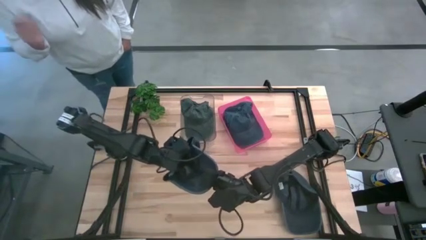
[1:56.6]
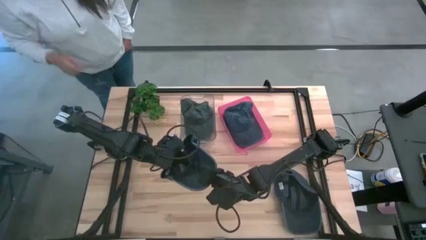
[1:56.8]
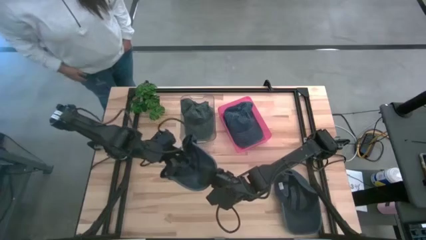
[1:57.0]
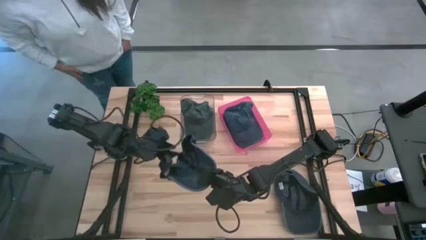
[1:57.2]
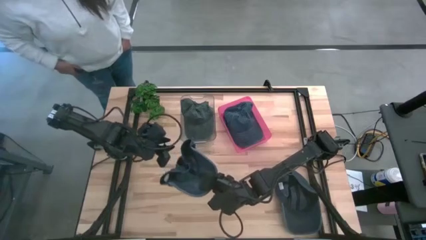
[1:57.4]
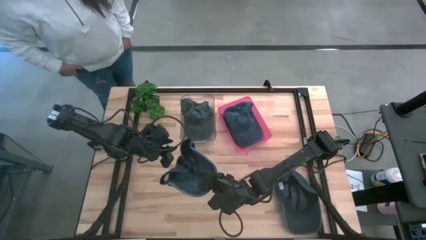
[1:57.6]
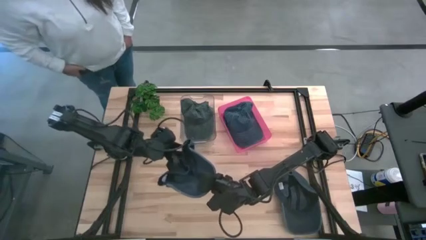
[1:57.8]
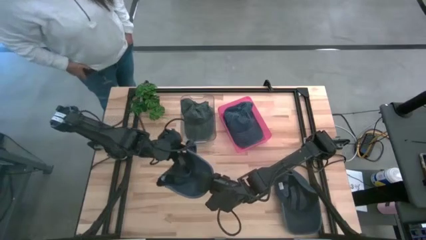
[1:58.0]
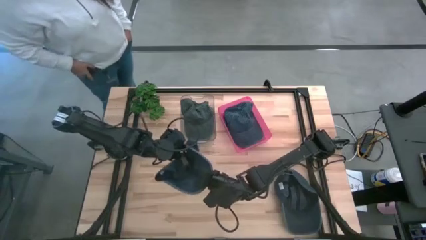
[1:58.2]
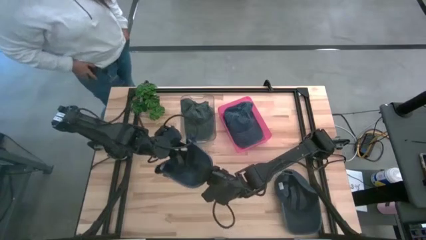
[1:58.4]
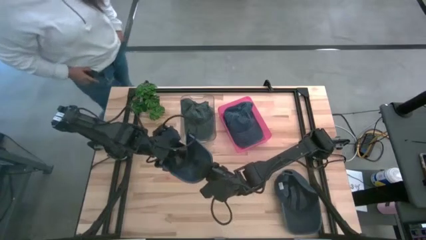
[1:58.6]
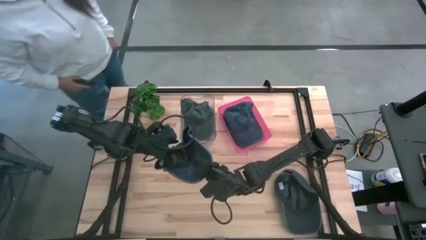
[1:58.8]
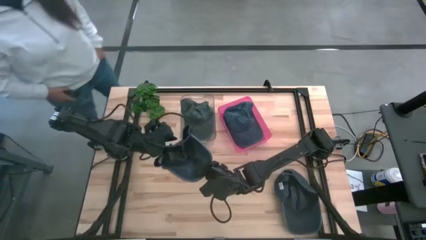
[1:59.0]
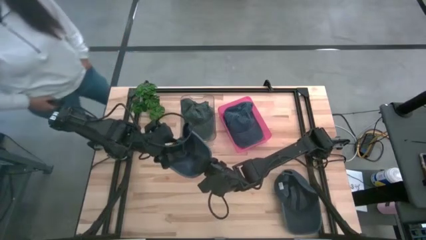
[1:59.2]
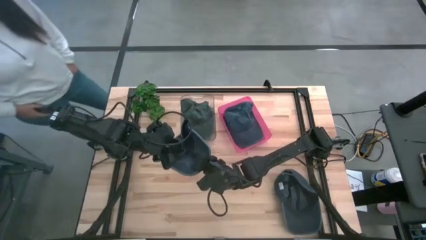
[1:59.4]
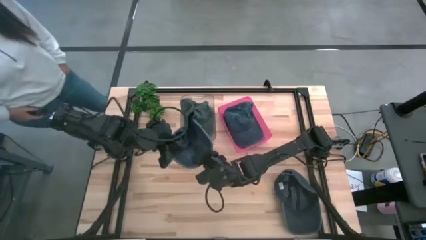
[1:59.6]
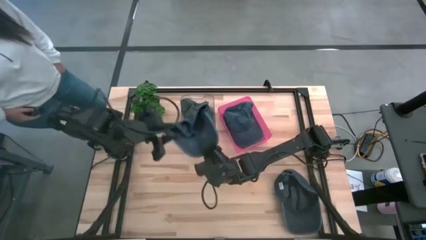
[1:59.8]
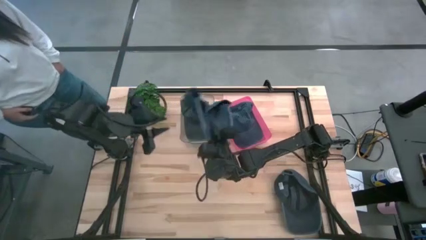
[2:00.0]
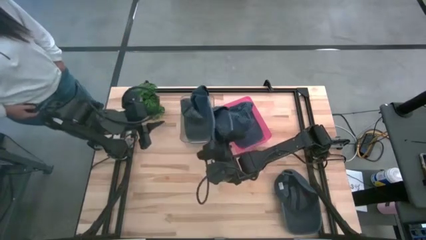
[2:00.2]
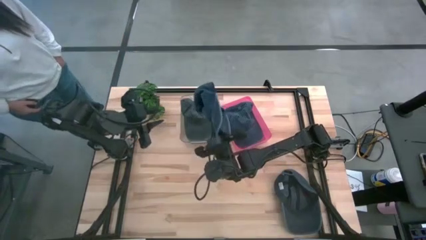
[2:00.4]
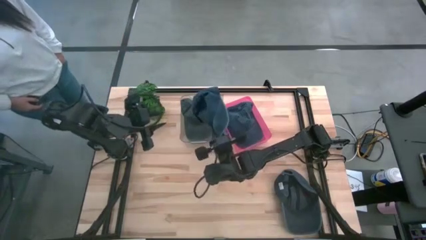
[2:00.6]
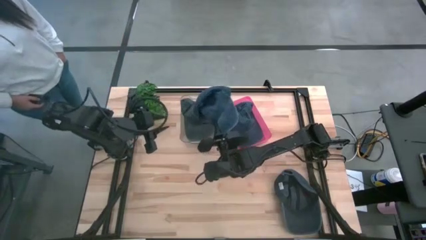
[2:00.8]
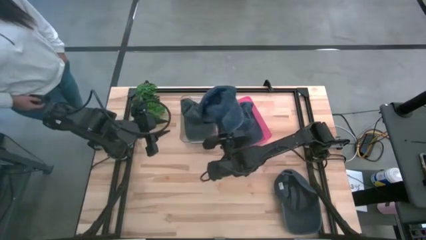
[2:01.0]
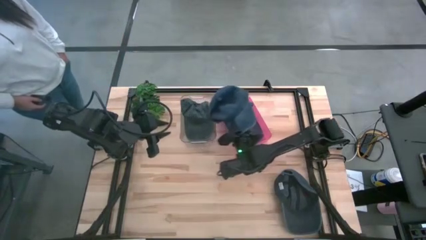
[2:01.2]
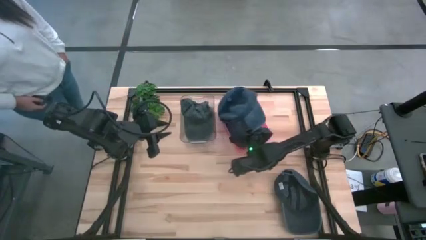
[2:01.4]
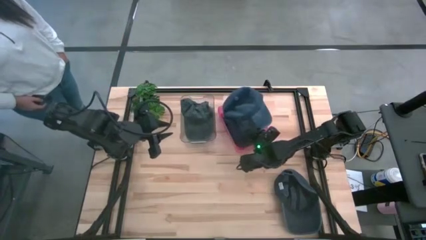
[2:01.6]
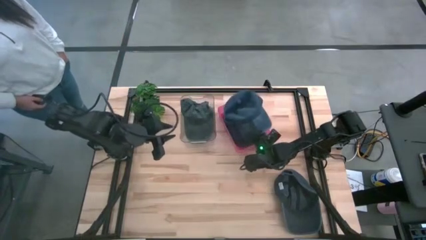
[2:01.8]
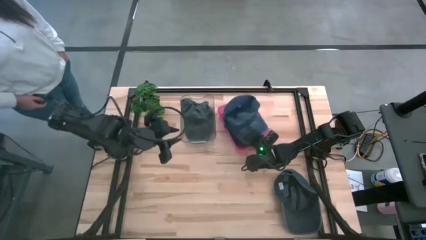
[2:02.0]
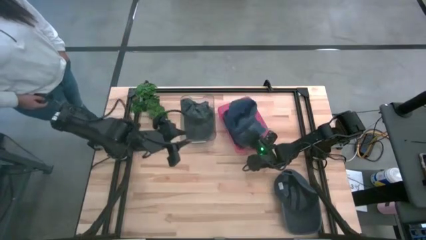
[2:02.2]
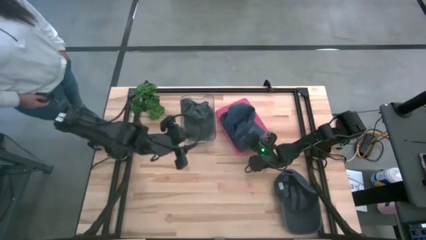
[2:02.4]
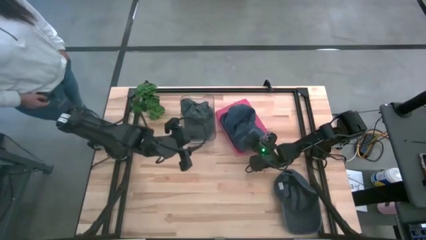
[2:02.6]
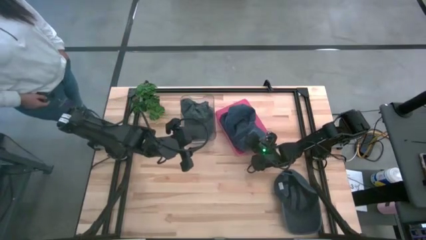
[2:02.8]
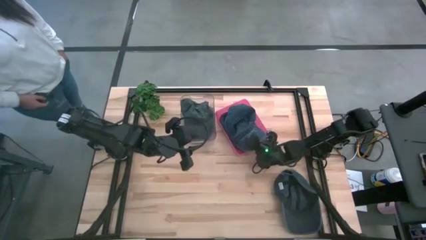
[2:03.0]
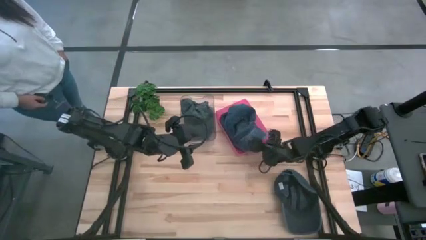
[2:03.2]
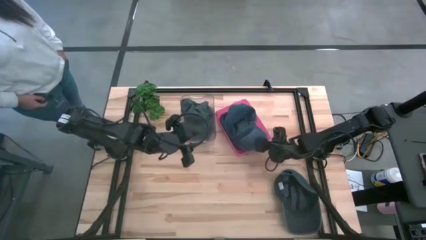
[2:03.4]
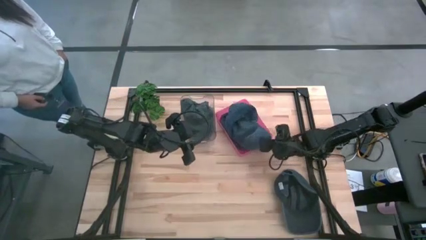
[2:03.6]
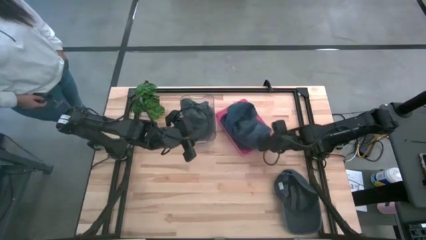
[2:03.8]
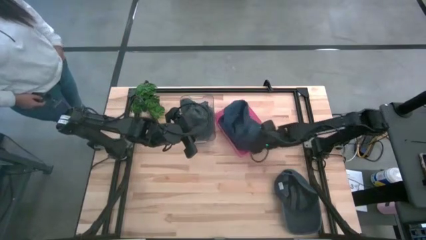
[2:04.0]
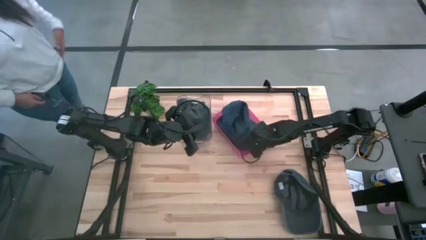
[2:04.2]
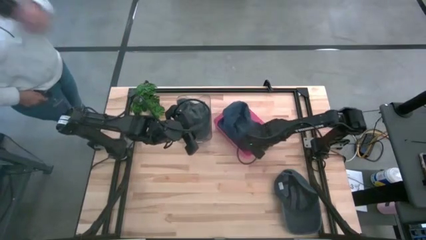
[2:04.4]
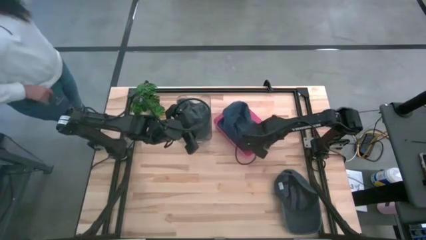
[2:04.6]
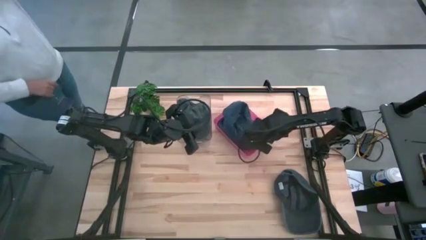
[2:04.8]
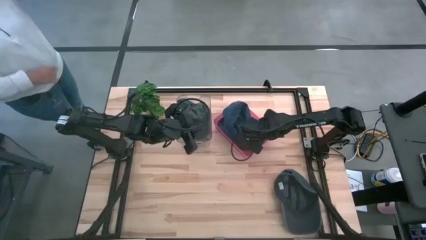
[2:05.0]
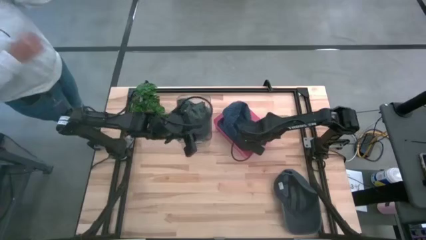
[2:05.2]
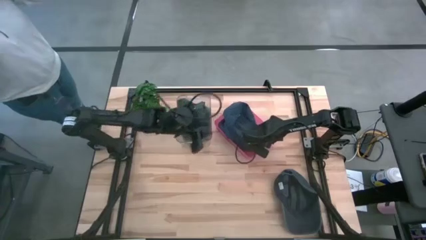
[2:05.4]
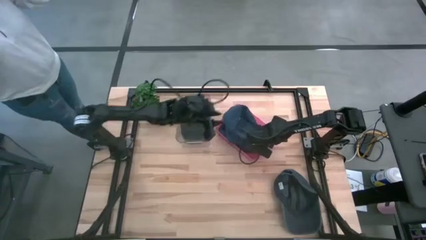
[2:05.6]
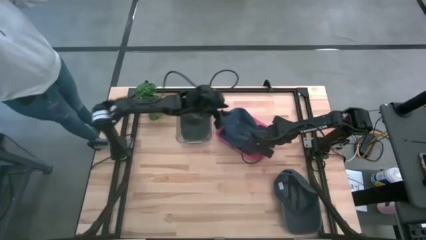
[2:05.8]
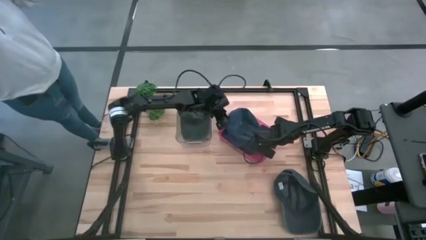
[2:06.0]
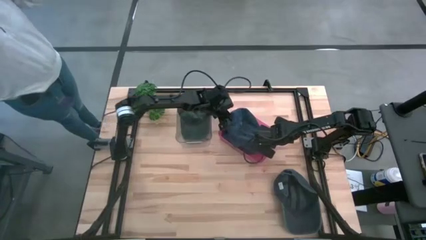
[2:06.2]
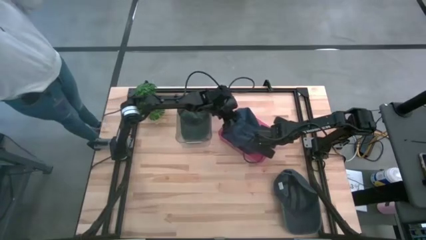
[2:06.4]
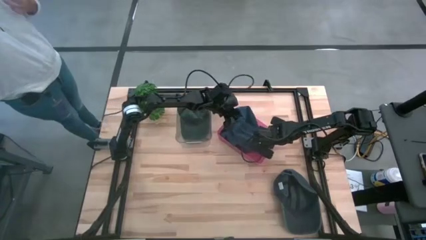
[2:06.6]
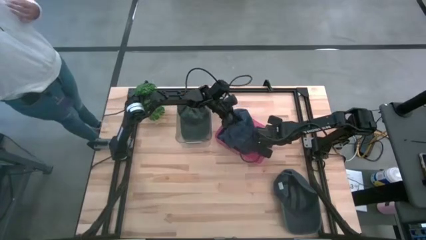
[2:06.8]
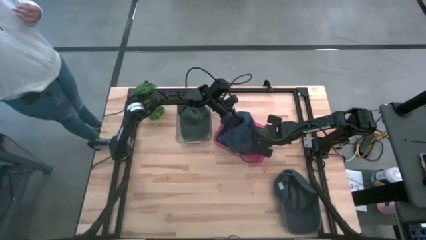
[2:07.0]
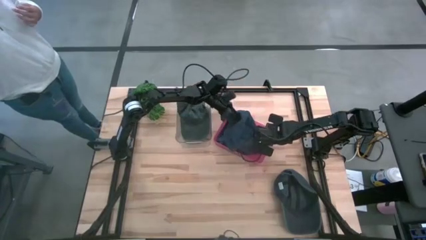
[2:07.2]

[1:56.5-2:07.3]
Task: Pick & Place hat
Put the left blue cap into the red bin

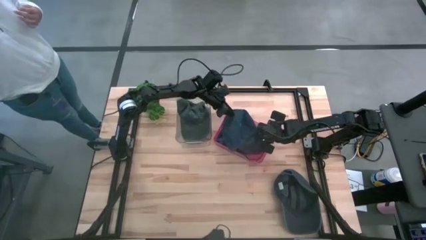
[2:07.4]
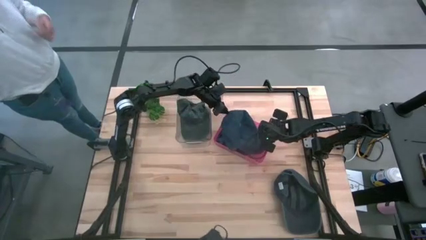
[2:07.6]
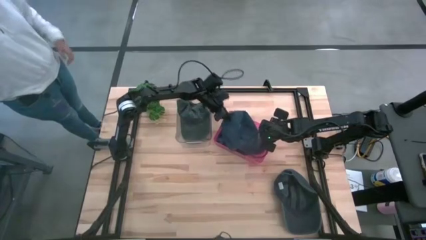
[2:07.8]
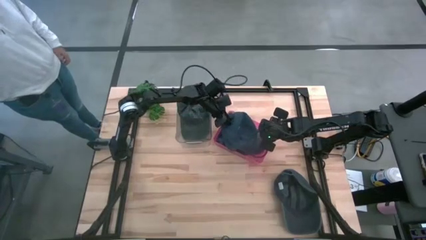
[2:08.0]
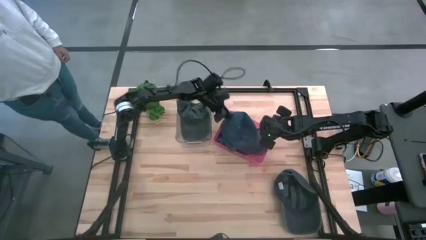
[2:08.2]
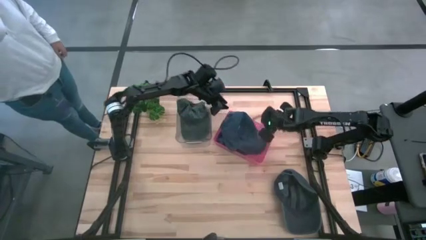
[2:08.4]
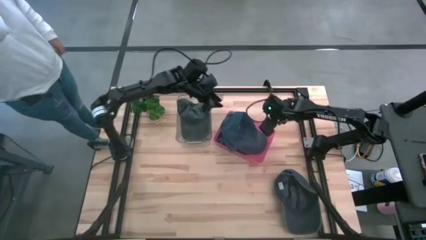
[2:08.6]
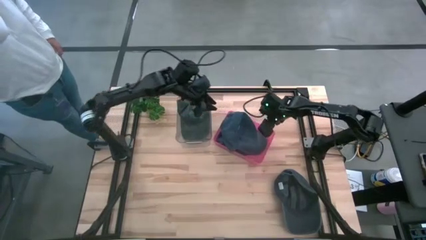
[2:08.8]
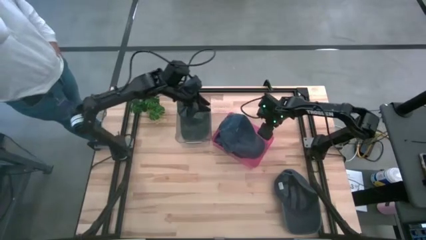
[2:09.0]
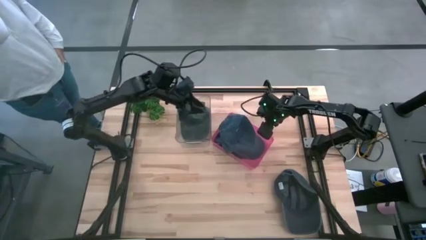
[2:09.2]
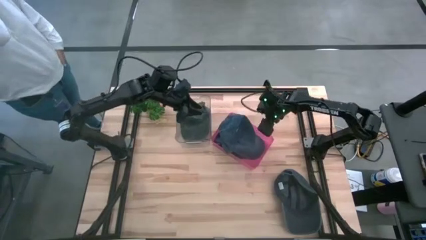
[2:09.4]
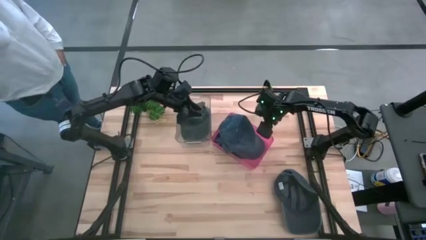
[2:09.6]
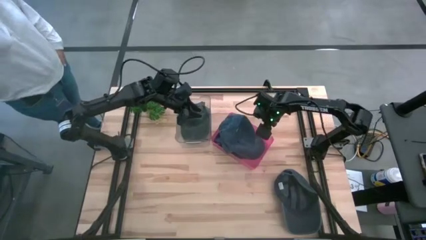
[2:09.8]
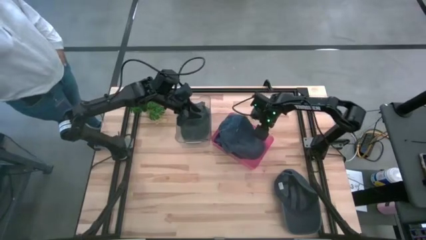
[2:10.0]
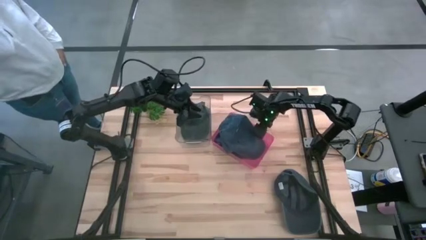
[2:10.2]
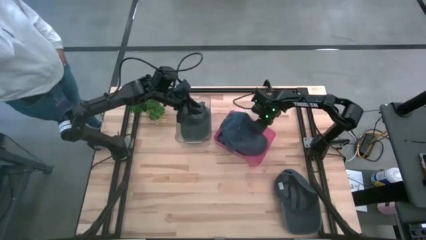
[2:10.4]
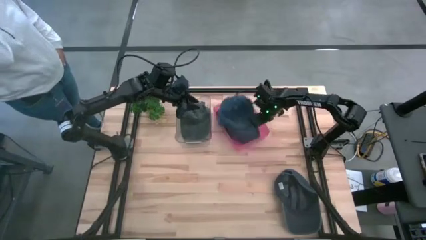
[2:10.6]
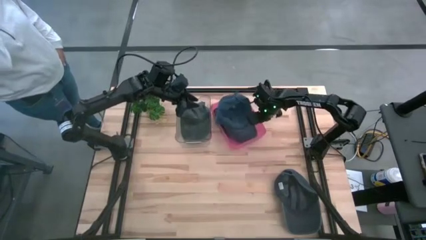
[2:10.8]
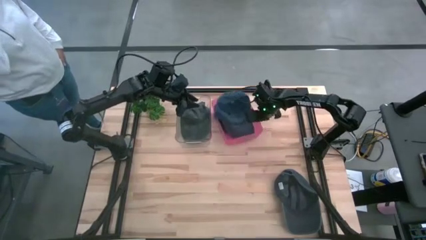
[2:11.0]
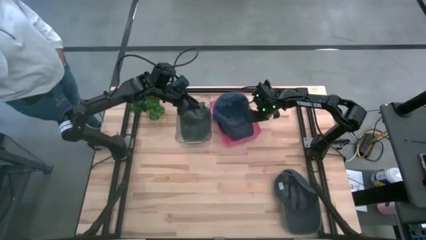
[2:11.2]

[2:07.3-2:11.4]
Adjust the red bin on the table

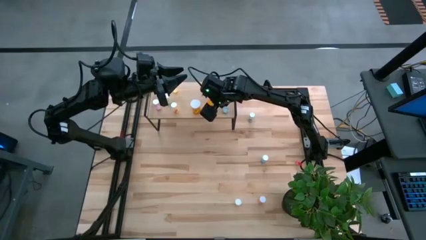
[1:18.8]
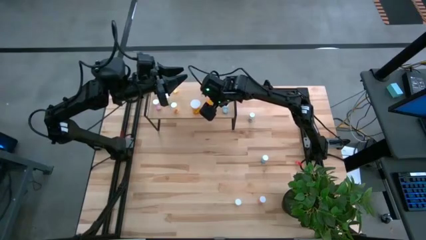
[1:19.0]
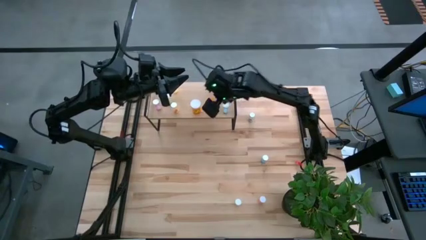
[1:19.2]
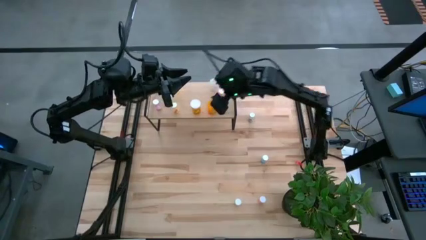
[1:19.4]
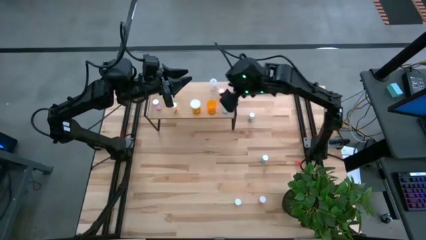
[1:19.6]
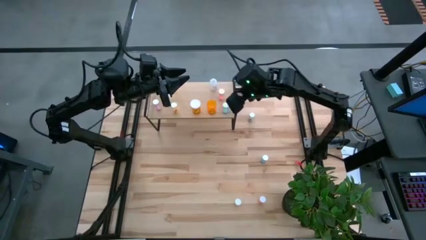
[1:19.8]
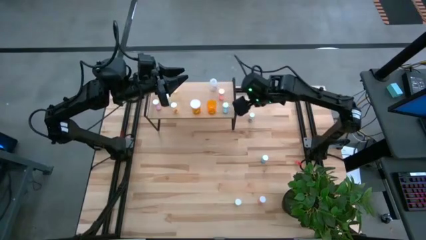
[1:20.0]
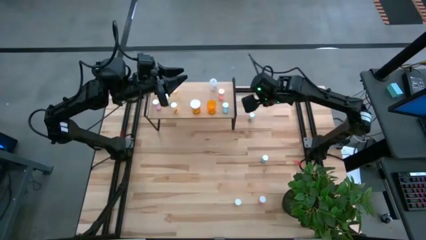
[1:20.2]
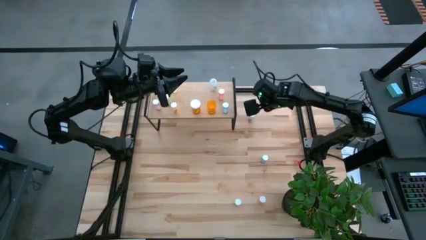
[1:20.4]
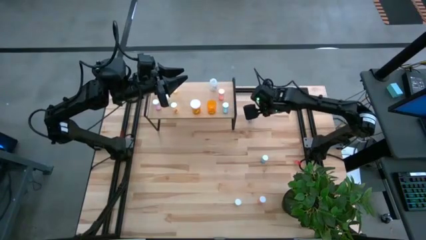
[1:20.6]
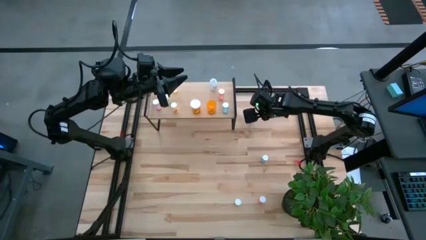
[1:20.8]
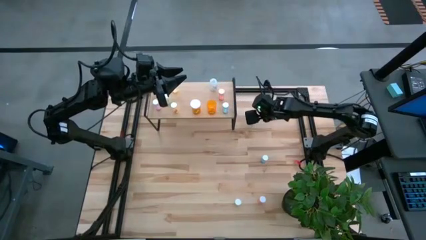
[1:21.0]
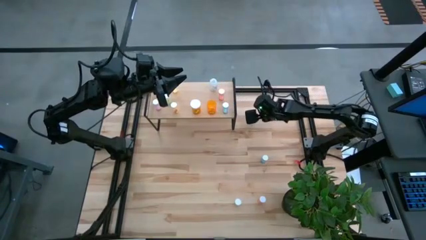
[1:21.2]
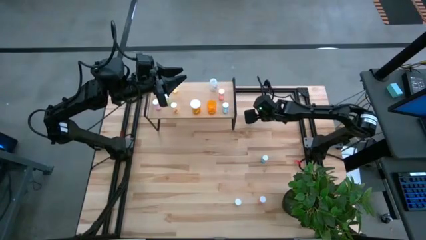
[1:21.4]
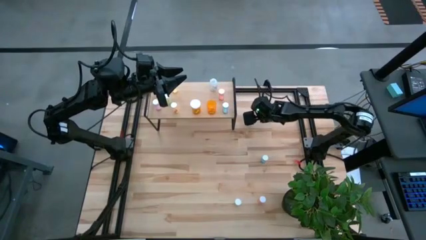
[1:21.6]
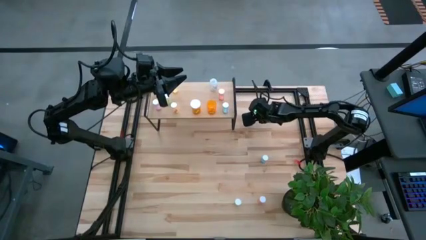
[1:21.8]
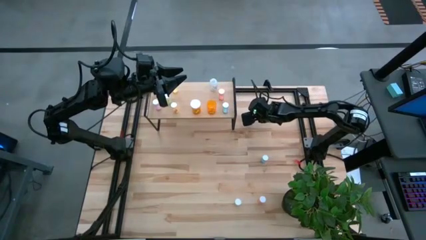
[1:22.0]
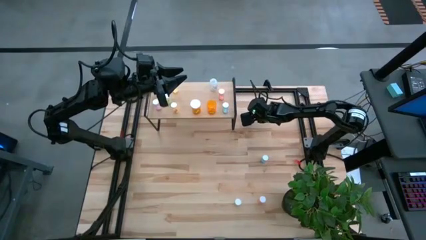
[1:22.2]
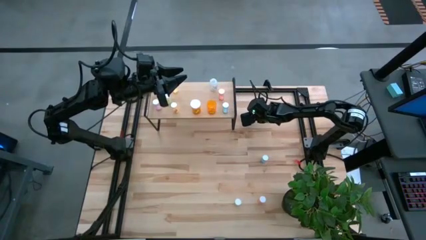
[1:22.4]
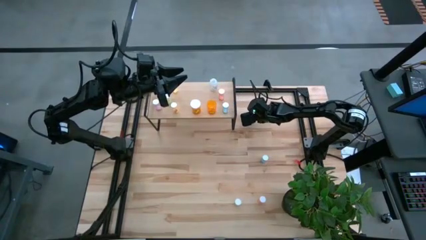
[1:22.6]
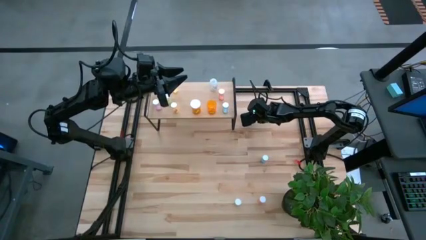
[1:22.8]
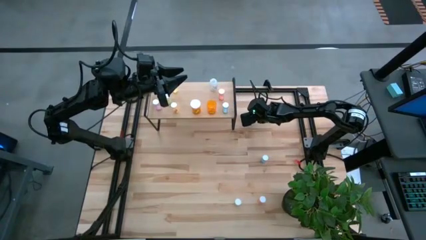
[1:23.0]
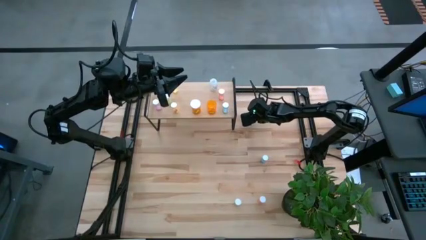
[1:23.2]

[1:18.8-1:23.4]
Task: Pick and place medicine bottles onto shelf by color
Put the blue pill bottle on the shelf
